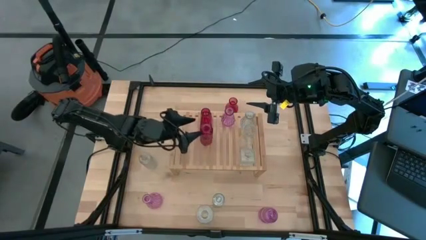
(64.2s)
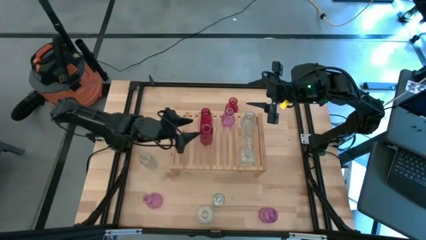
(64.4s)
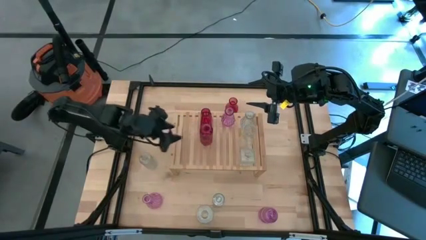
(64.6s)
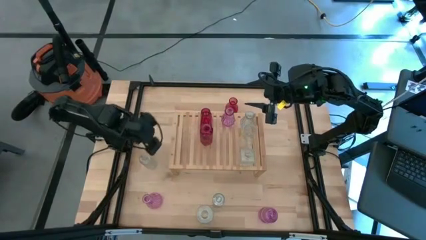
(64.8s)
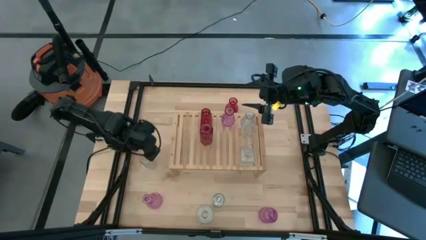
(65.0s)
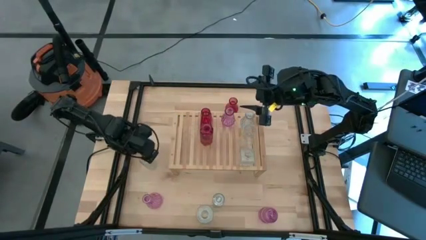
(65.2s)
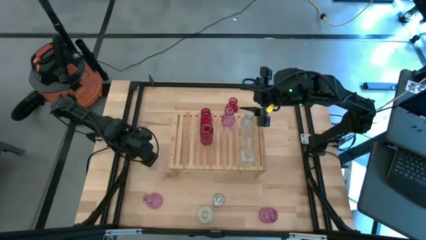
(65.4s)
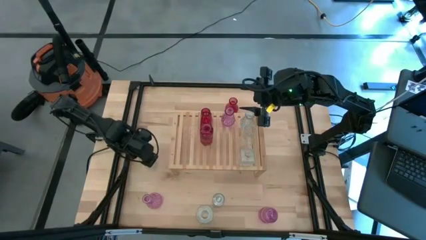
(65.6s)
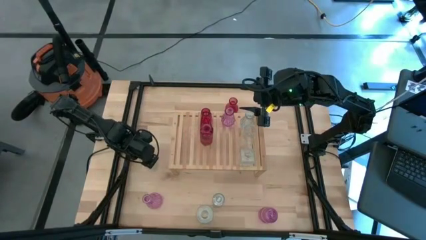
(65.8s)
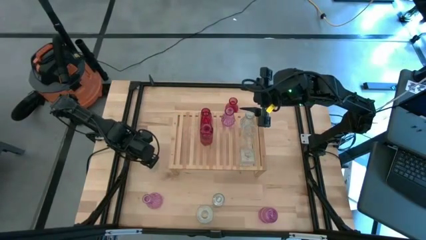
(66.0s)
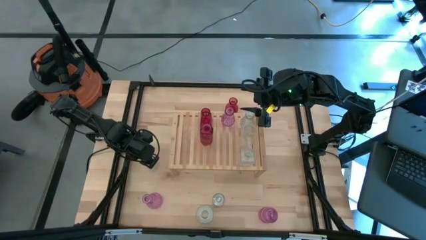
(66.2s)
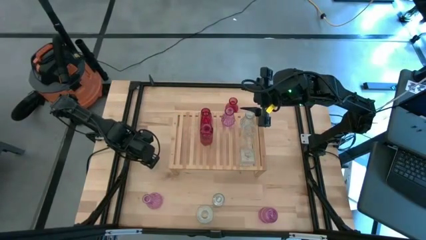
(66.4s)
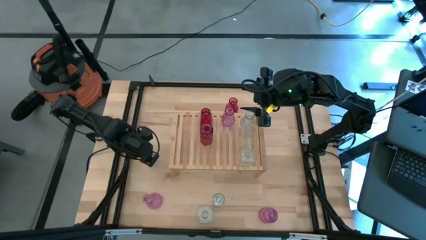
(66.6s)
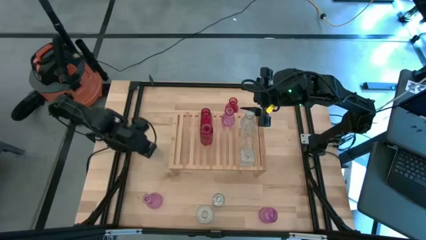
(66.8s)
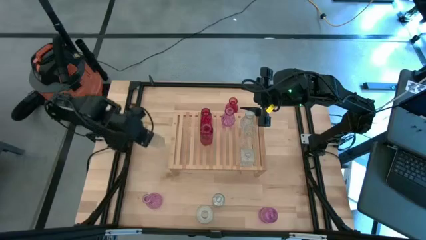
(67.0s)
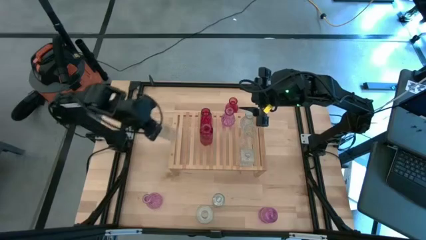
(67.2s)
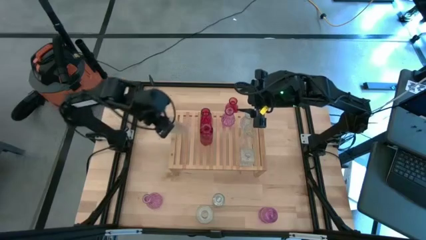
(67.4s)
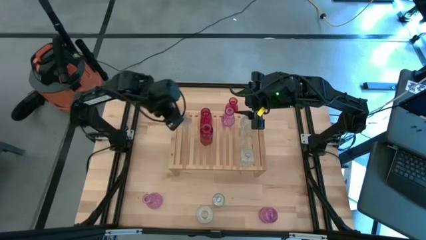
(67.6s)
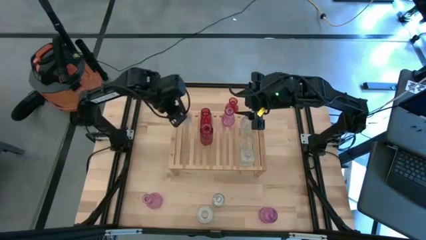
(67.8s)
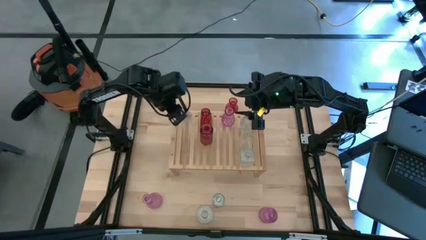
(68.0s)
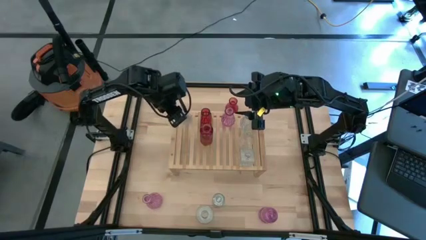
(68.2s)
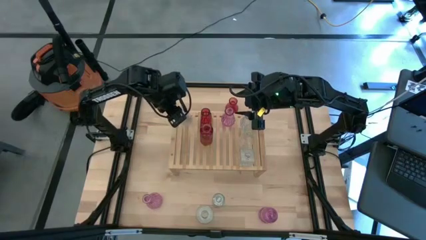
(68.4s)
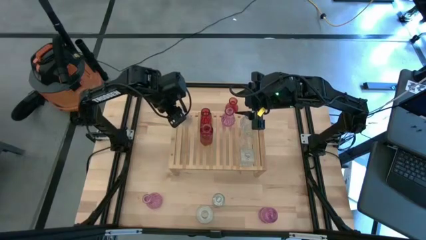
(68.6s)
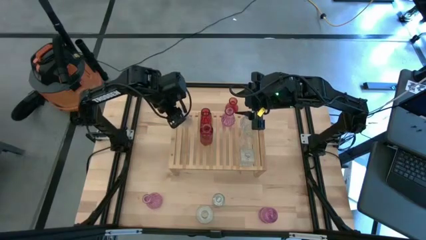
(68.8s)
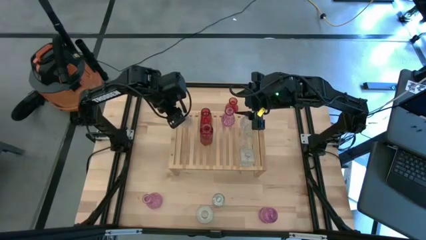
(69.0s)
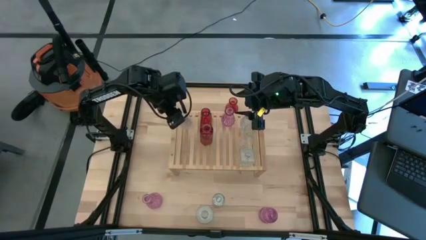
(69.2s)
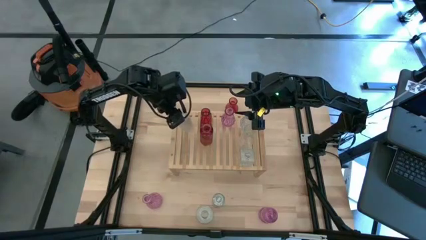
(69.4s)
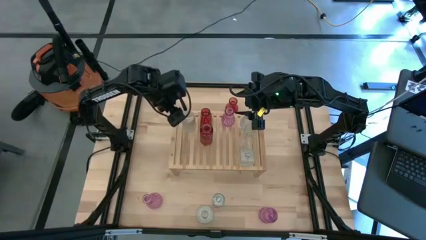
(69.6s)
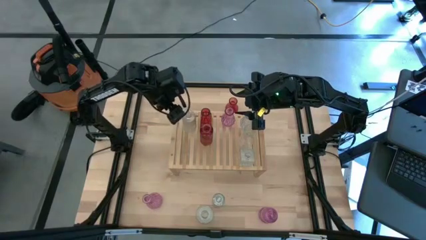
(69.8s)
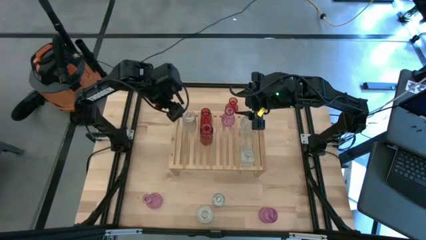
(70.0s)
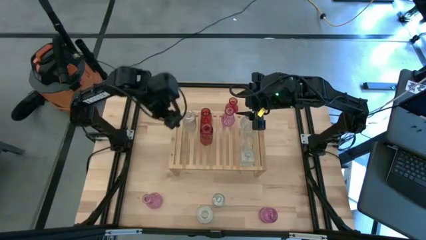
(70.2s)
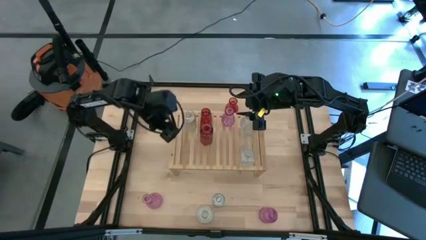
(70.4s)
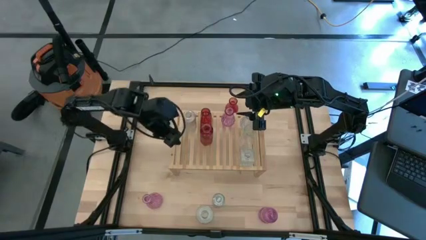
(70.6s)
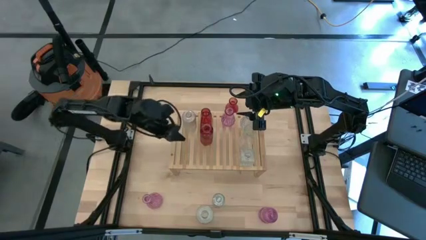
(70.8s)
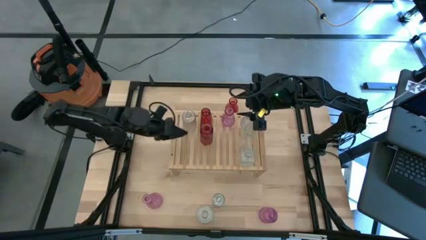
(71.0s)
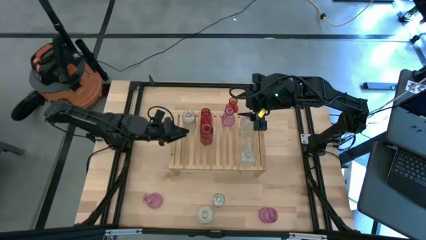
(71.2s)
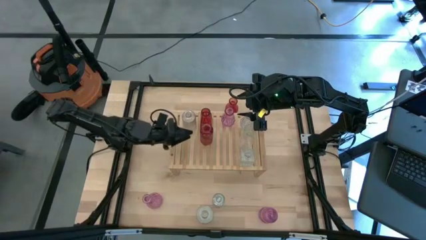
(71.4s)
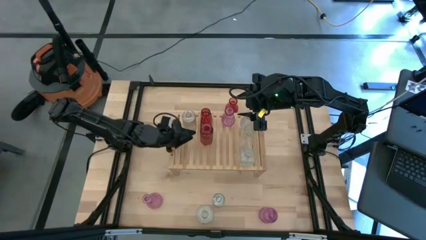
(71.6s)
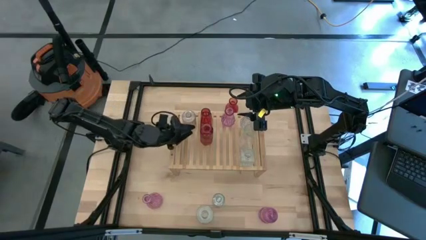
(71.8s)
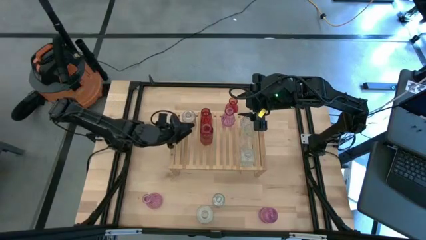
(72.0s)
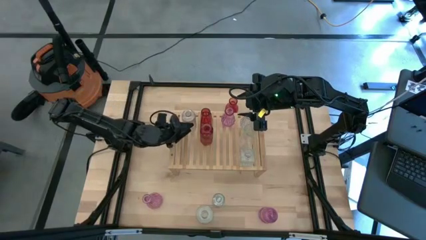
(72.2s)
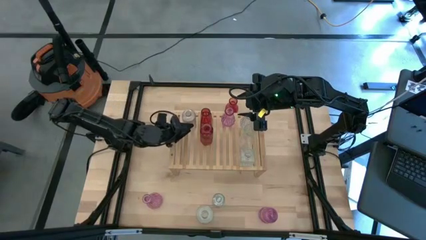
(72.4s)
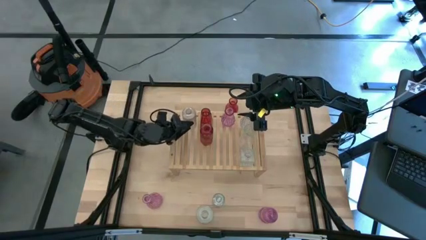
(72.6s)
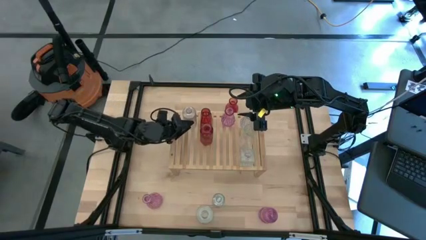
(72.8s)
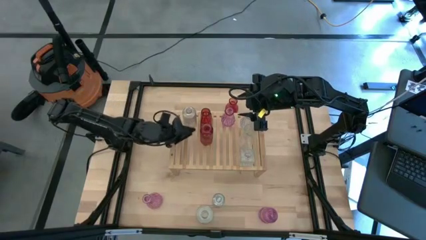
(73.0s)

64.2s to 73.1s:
Task: sort vases onto shelf
Put the transparent vase on the shelf

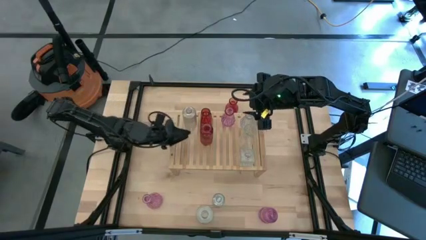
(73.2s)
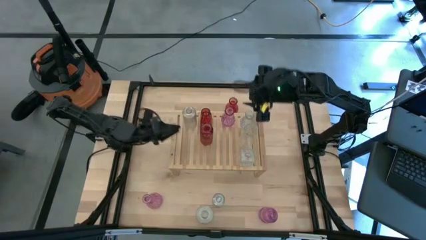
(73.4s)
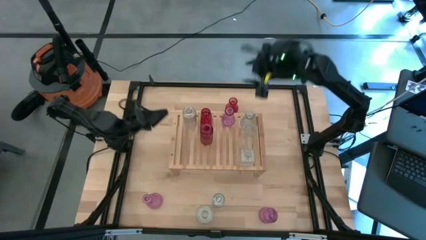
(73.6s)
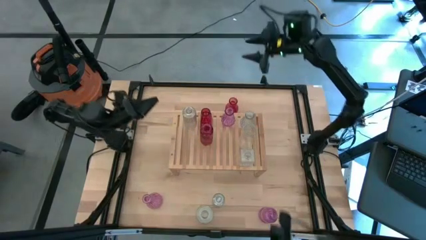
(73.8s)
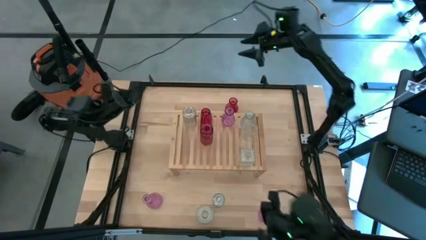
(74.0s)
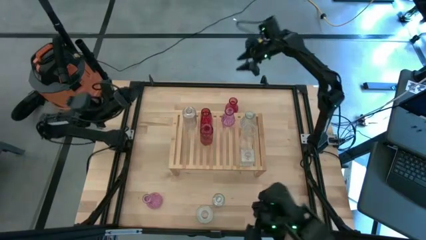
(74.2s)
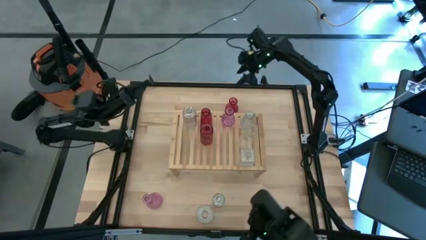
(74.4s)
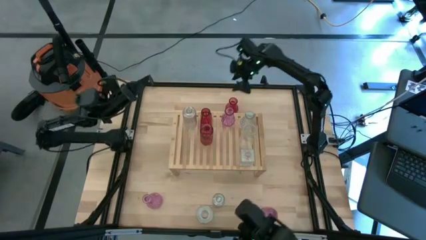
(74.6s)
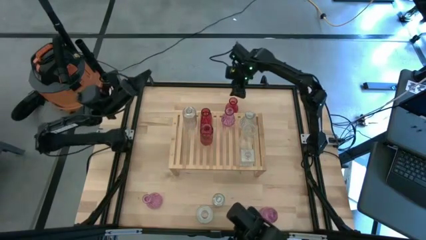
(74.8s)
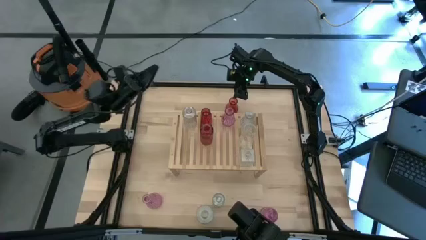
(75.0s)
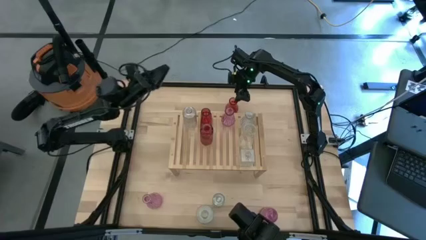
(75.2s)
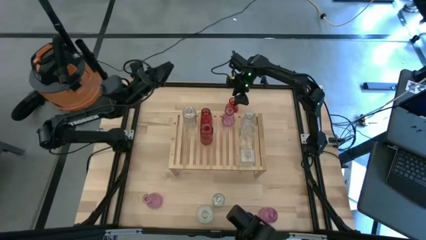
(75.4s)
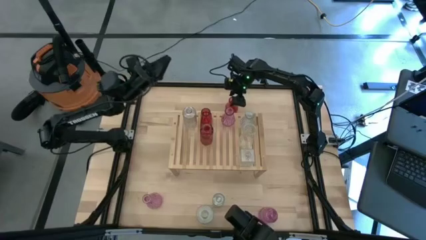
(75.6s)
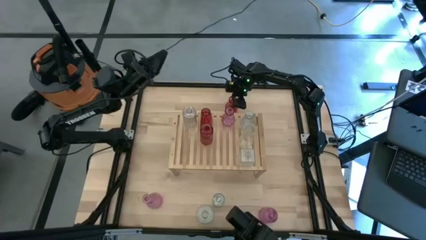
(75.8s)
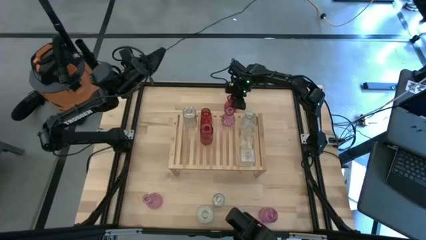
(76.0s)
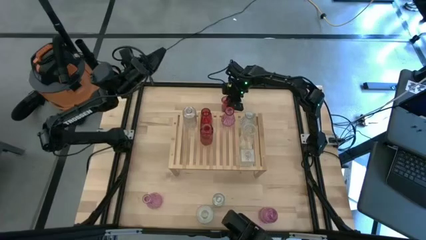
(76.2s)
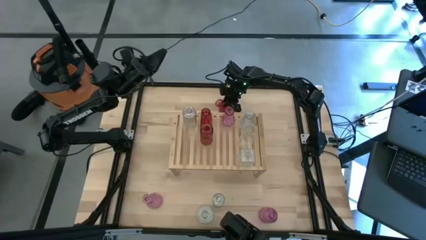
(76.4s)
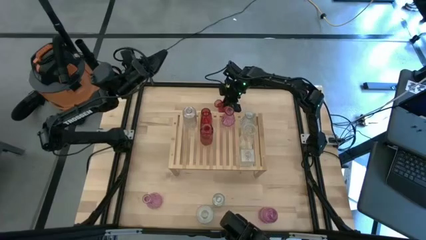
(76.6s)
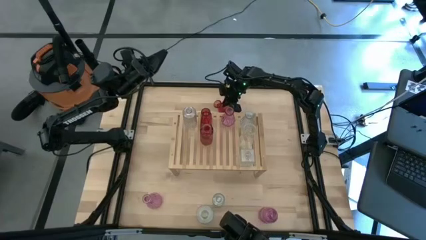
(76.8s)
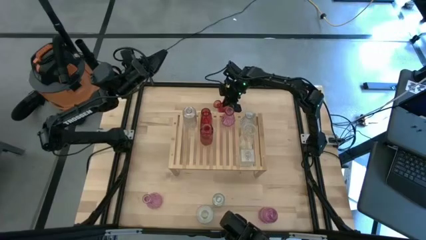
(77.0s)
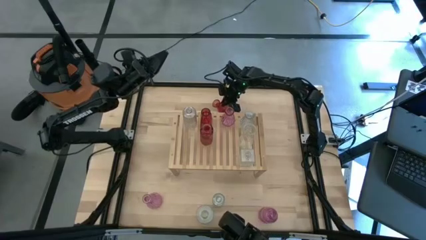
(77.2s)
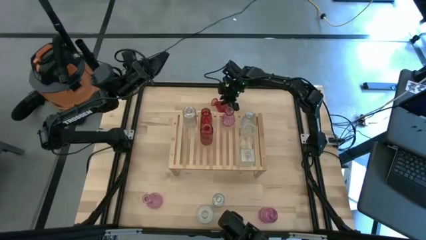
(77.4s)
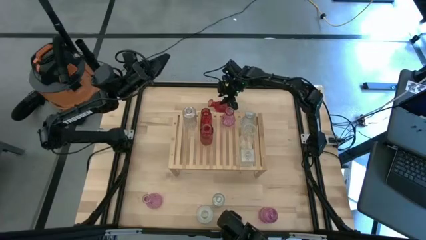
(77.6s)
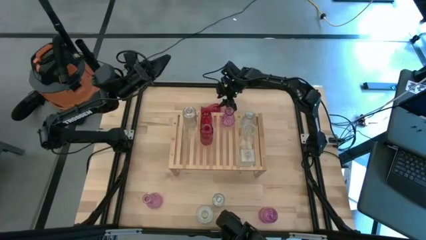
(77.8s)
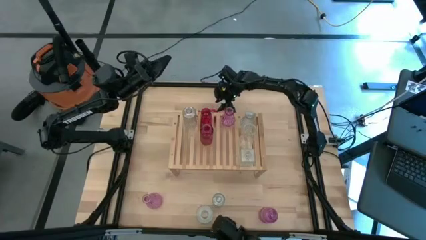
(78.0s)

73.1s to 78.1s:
Put the red vase on the shelf aligned with the other red vase

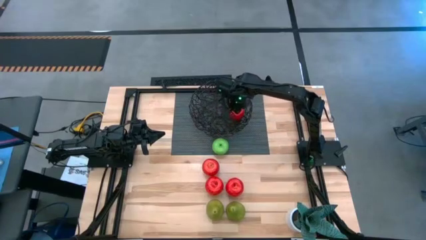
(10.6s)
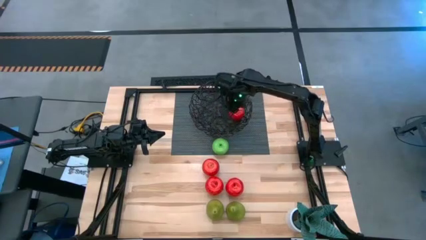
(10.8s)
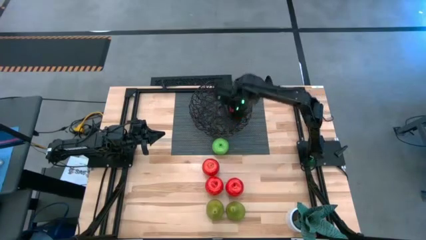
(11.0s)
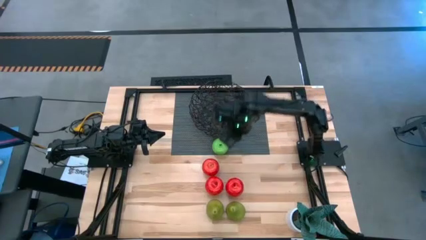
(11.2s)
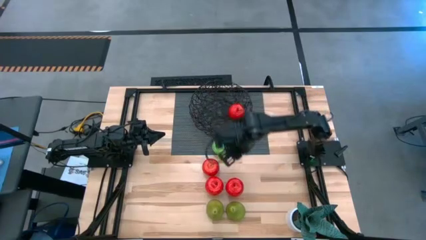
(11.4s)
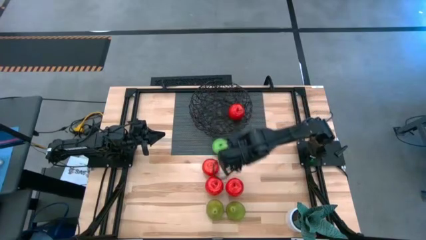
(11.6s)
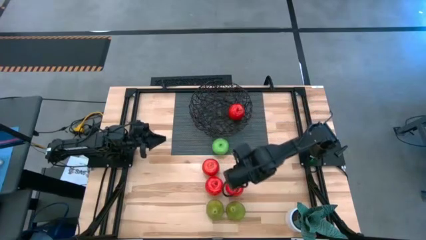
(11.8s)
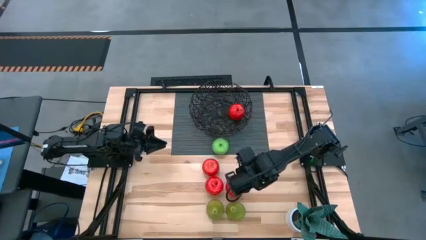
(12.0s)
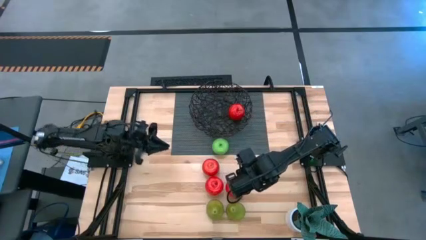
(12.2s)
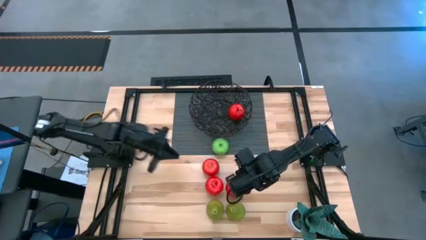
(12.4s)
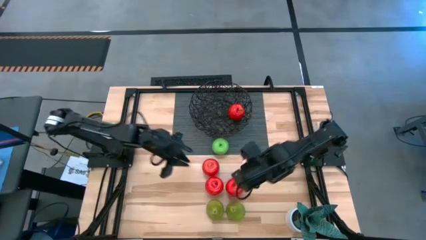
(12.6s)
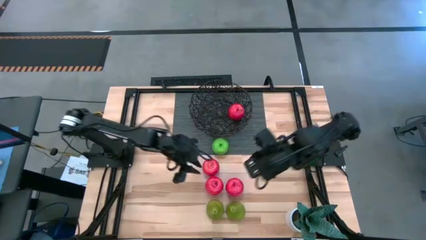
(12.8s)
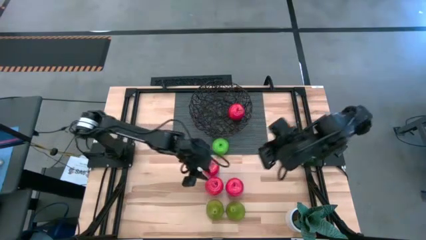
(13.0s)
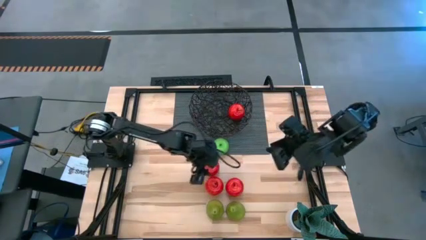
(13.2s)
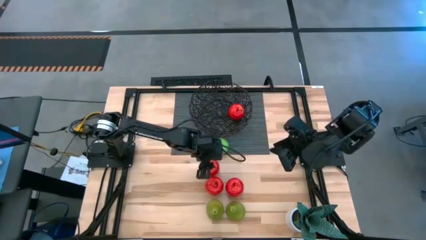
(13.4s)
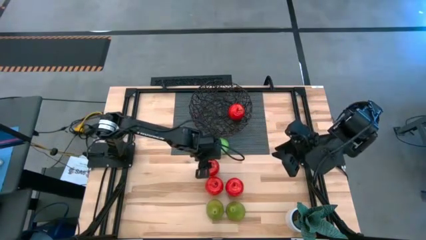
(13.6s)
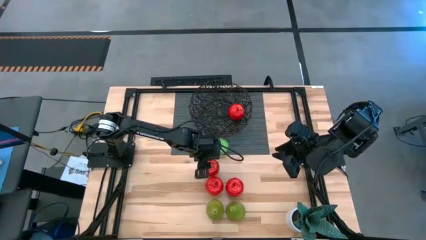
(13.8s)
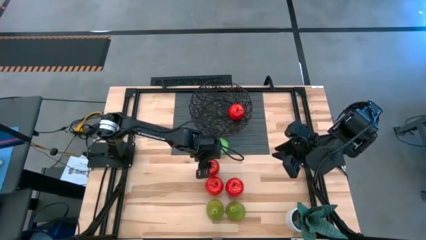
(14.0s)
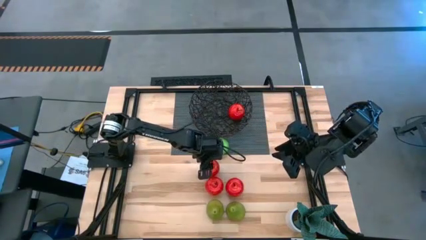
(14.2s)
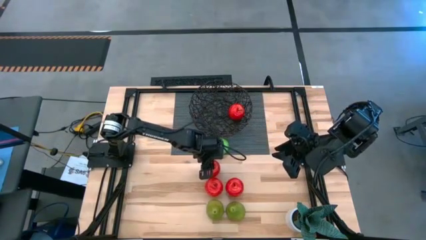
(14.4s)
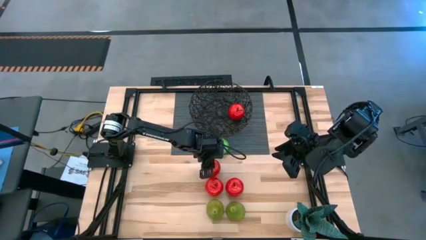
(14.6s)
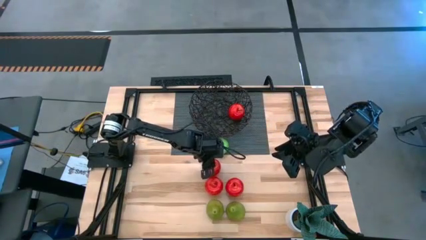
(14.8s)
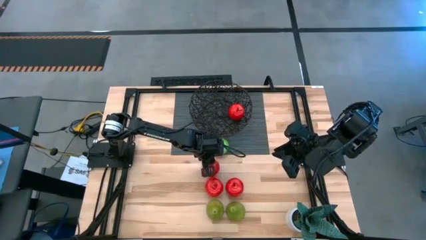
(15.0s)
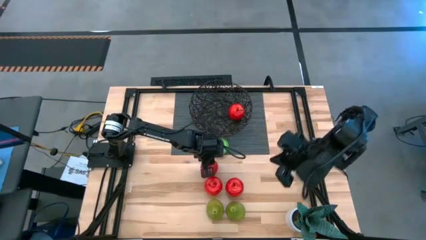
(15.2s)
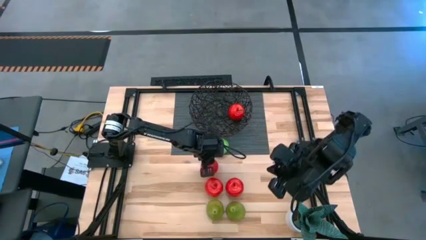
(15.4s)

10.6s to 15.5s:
Task: Build produce basket
Put the red apple into the black basket
